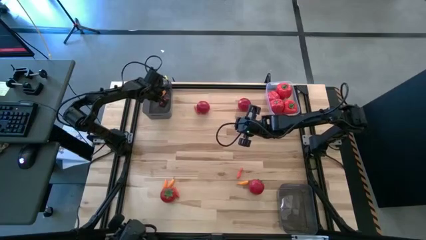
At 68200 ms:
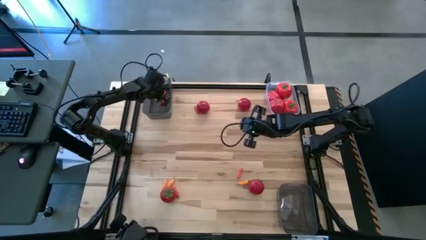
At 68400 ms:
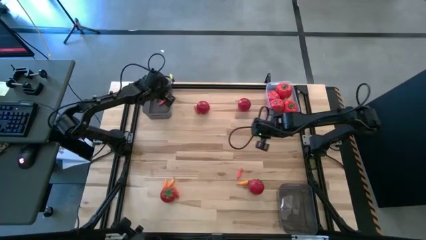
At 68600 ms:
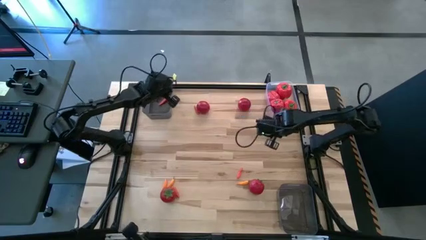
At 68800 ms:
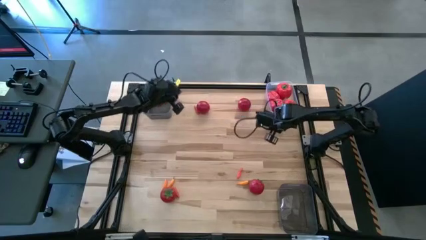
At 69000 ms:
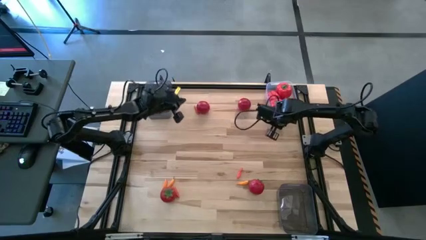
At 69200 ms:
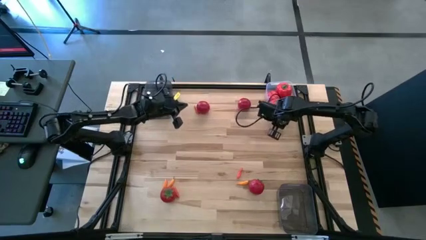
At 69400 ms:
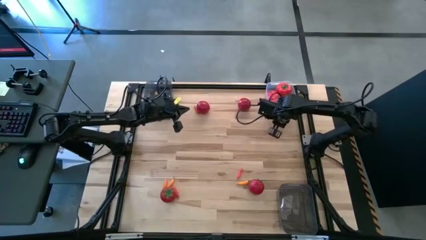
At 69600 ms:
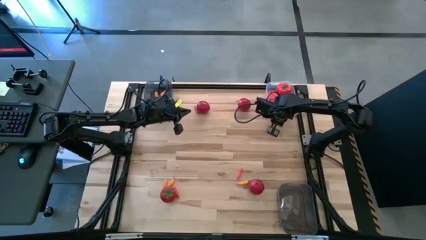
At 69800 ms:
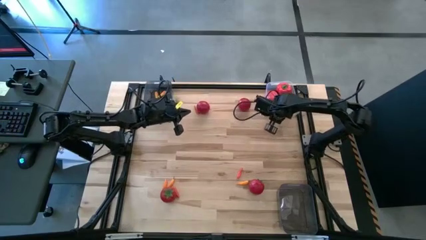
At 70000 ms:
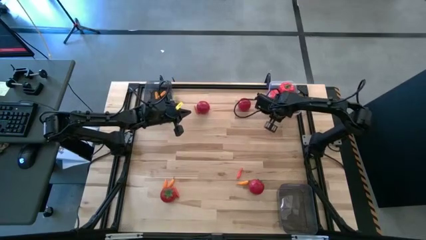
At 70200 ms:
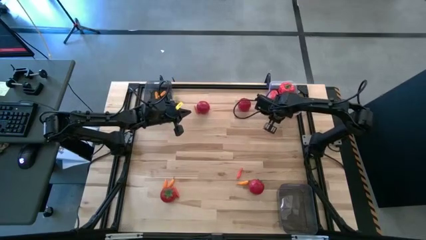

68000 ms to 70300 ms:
Task: Sort produce into baskets
Adjust the transparent bin

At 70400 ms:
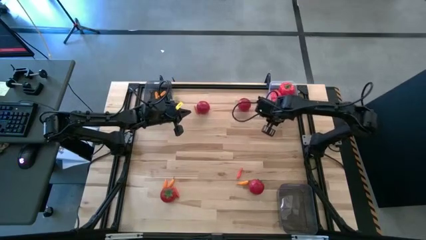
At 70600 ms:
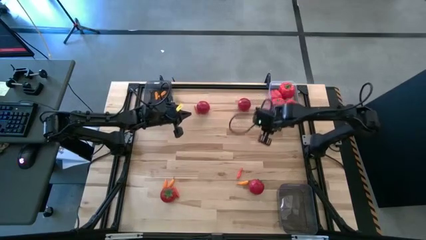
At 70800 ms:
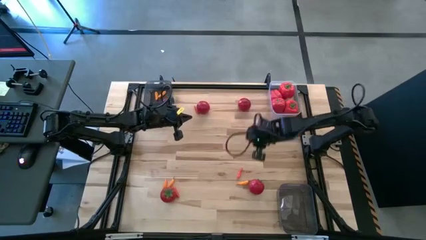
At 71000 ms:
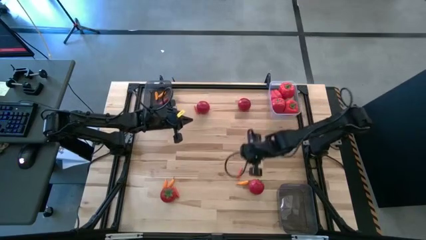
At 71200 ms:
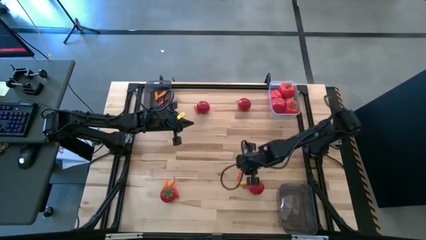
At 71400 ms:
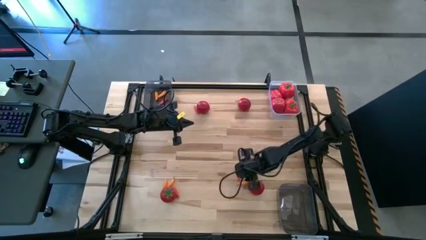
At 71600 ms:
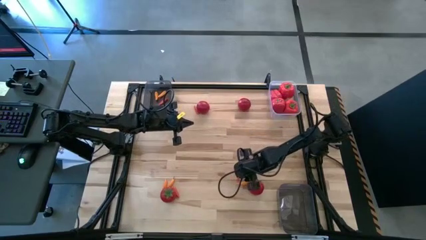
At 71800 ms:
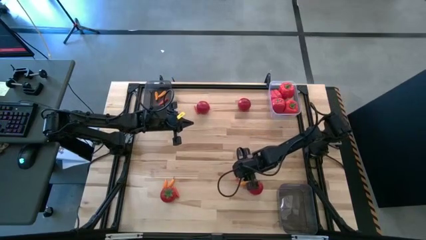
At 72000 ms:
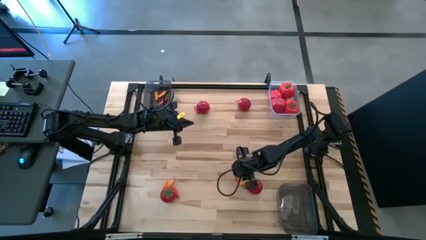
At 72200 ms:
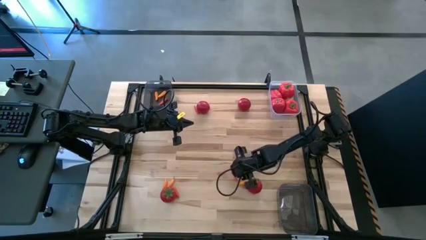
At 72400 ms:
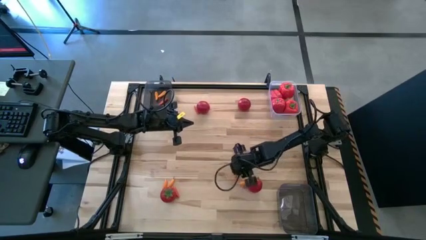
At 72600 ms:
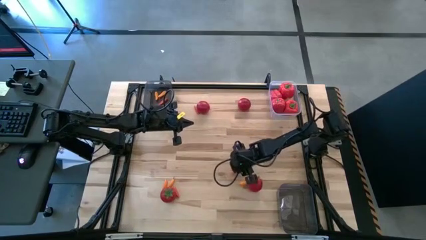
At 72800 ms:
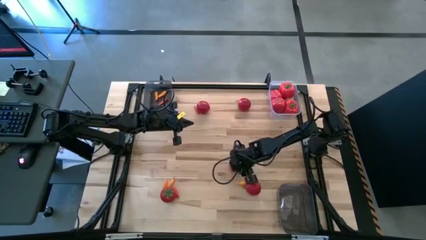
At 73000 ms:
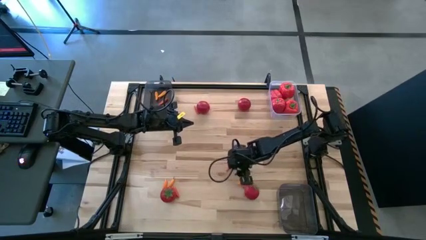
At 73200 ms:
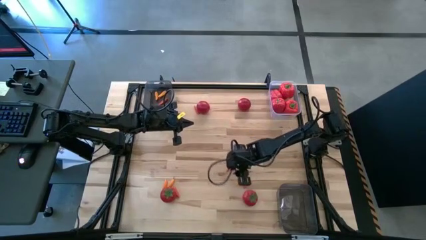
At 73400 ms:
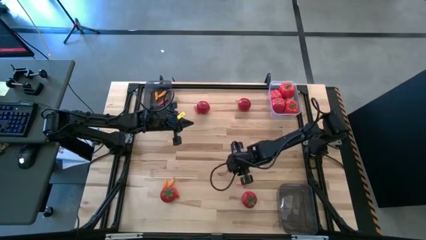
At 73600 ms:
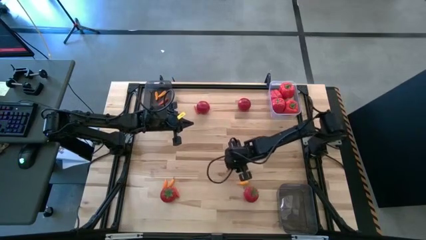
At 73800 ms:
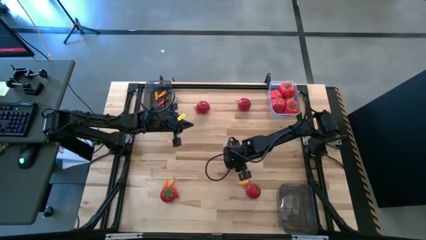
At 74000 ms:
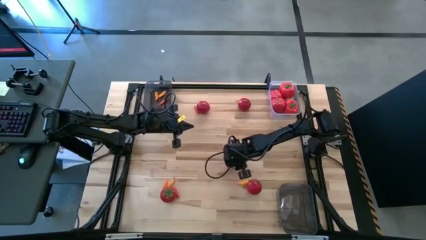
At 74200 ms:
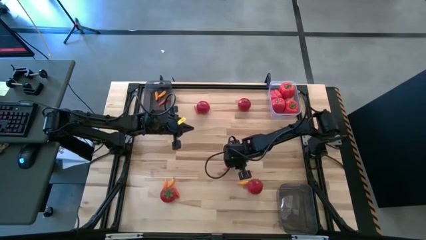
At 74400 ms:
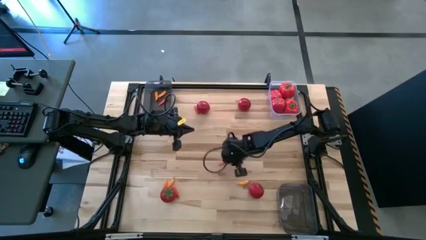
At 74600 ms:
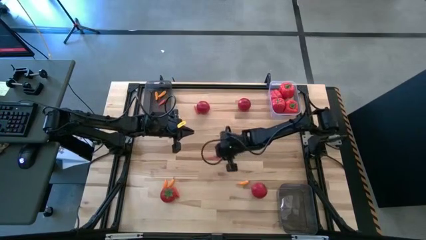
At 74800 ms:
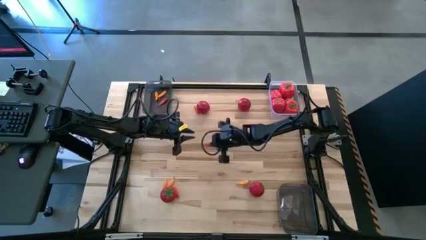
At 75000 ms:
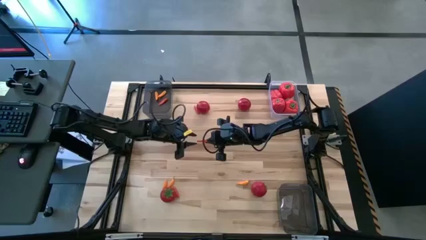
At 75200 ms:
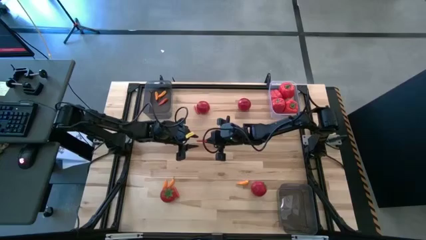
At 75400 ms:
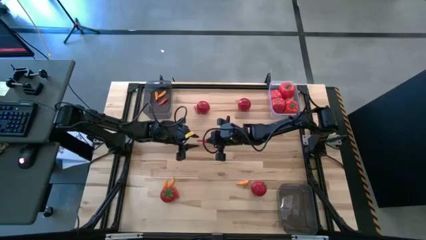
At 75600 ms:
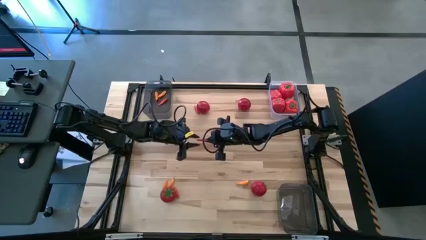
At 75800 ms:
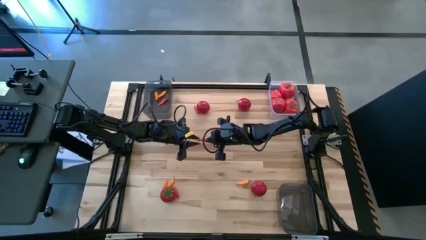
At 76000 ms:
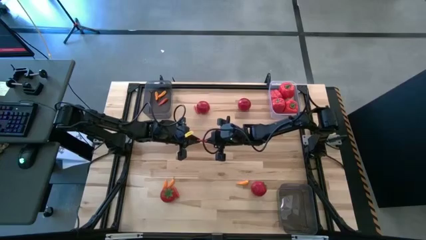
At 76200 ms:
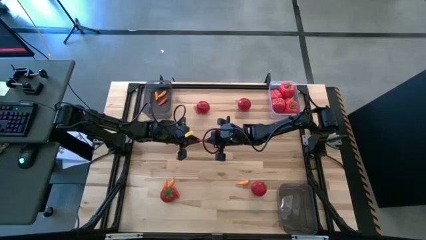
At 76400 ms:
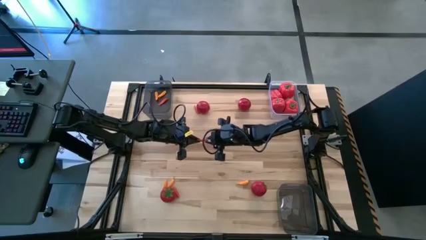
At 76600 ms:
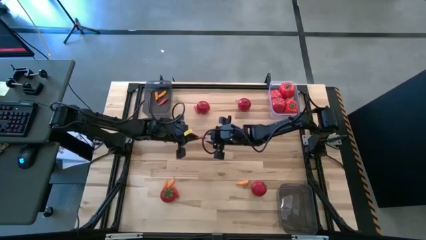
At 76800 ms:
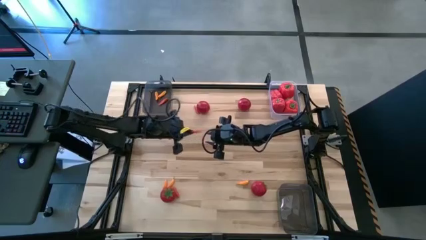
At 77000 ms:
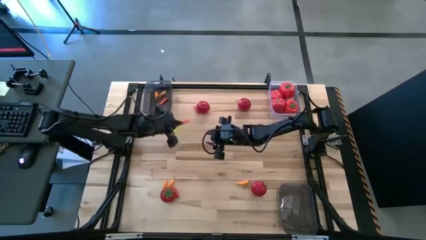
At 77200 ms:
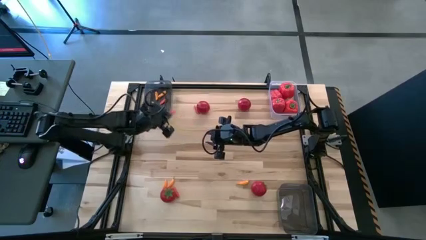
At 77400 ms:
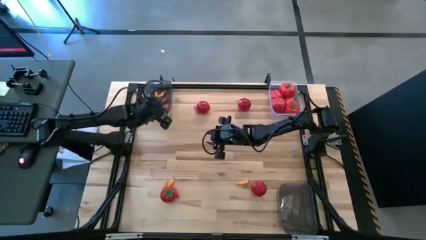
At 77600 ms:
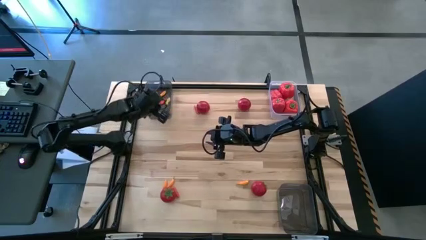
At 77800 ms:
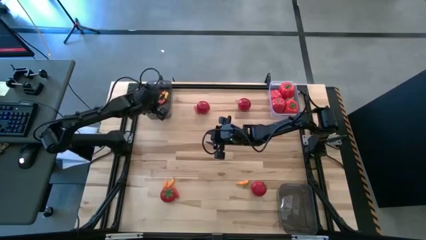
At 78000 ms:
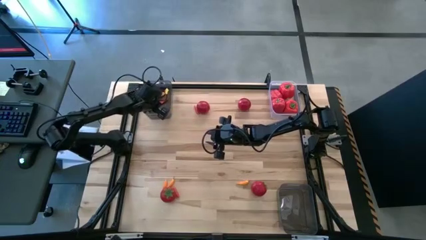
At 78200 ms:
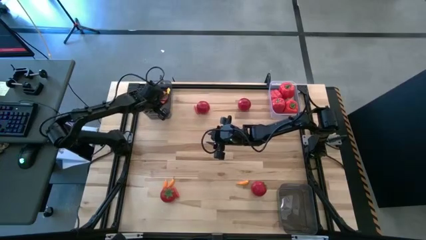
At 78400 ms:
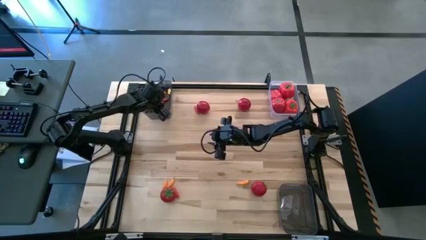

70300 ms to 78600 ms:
Put the orange chili pepper into the top black bin

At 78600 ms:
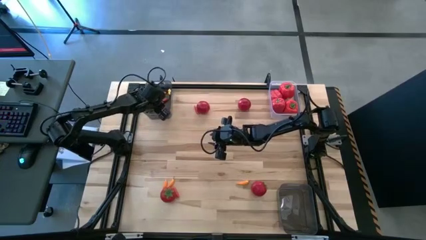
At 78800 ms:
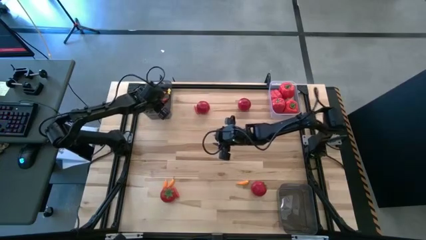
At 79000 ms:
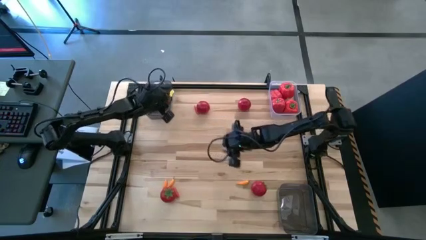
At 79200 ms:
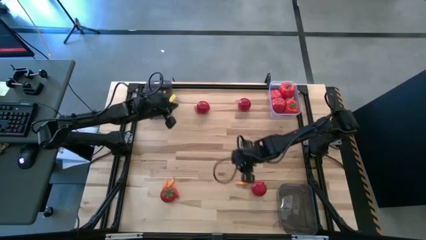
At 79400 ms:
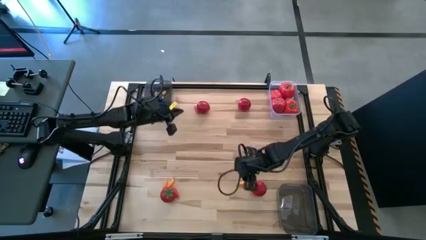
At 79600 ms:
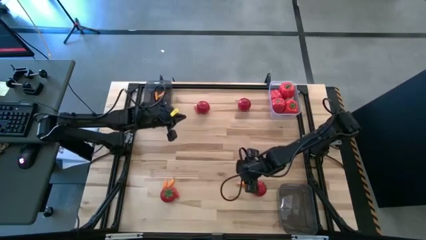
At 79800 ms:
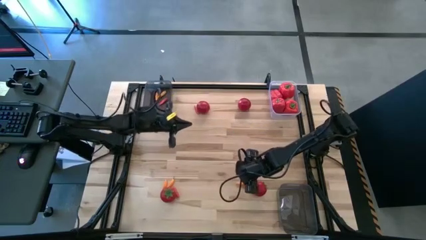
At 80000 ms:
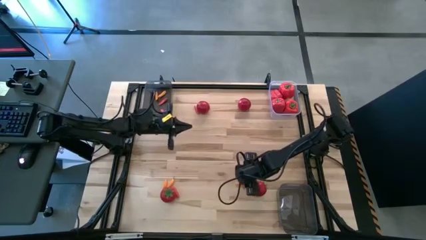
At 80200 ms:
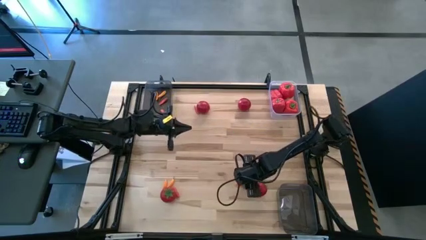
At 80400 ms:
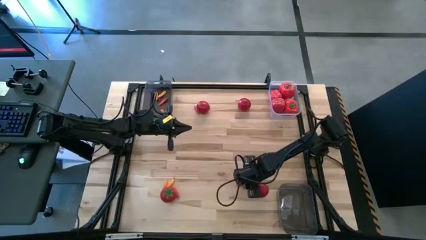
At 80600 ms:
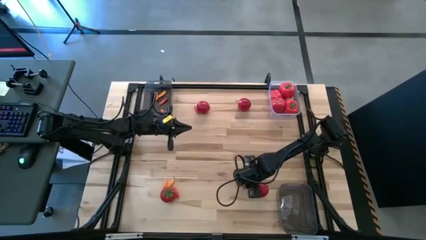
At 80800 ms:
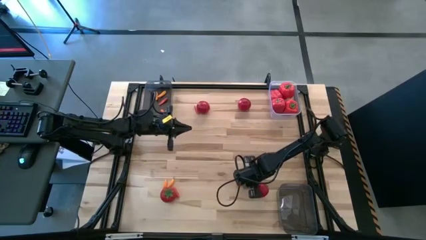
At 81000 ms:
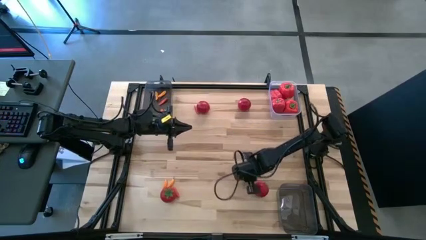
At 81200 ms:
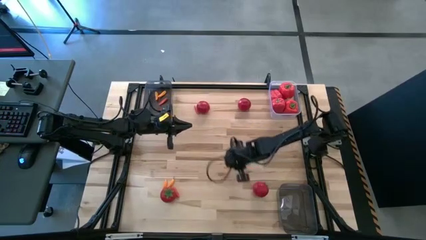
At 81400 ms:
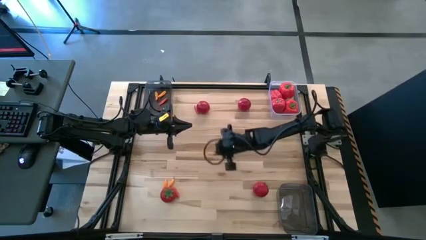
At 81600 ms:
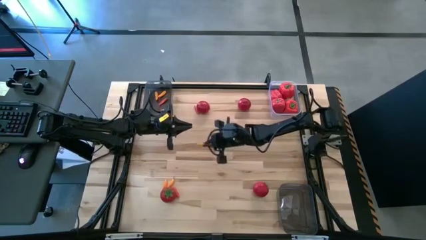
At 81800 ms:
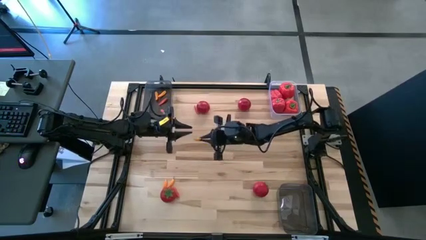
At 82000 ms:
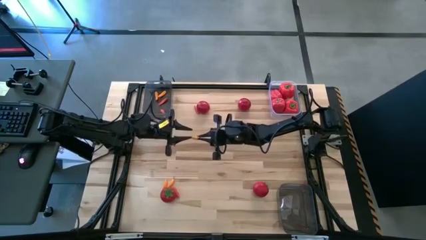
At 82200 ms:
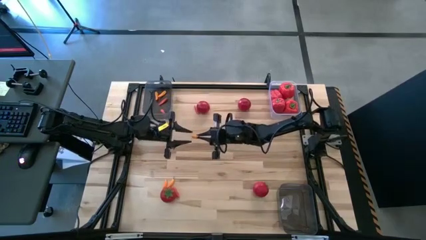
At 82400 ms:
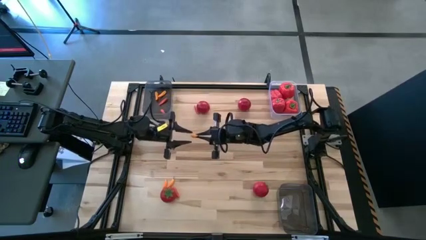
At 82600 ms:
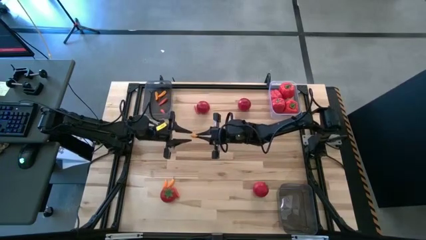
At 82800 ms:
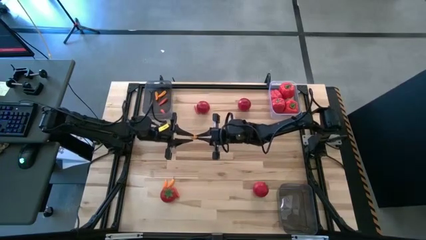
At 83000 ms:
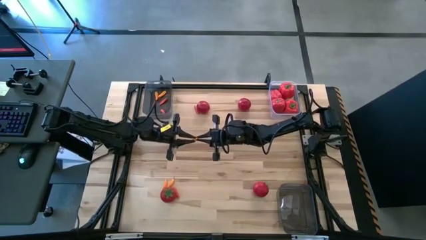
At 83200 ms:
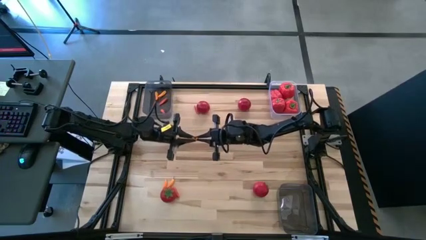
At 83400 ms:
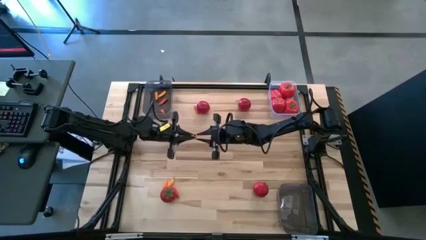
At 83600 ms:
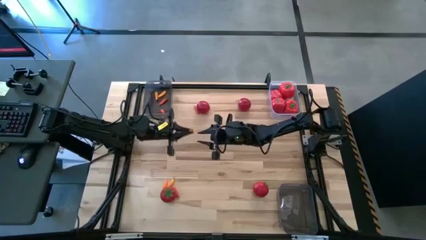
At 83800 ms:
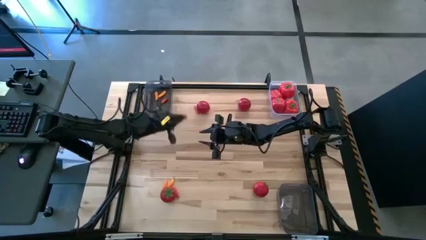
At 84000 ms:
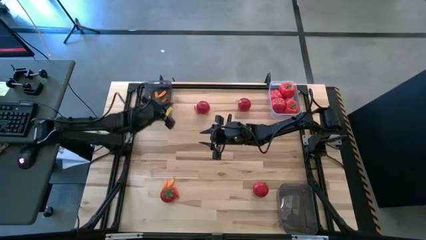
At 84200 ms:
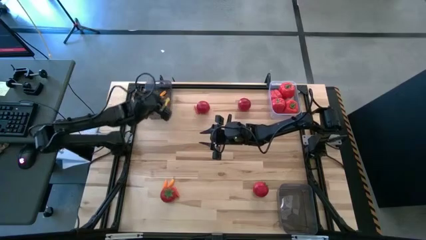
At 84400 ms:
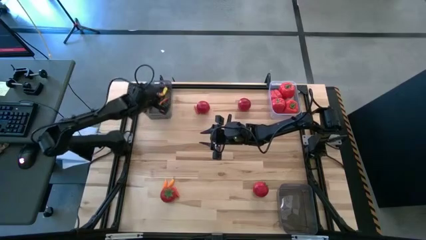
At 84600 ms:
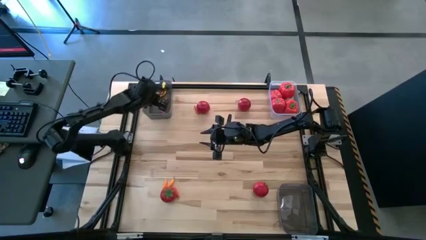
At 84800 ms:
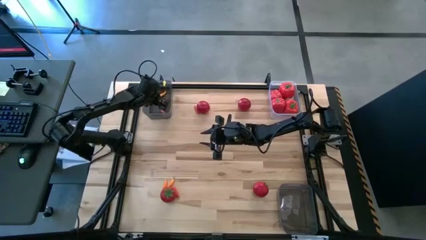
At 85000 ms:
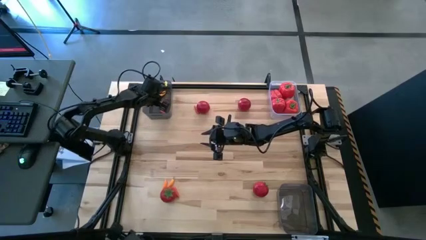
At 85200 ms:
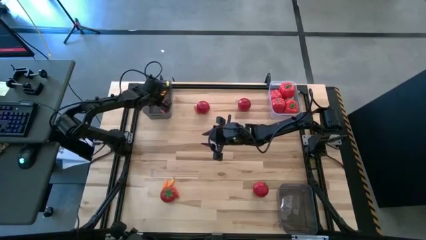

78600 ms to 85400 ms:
Put the yellow chili pepper into the top black bin
